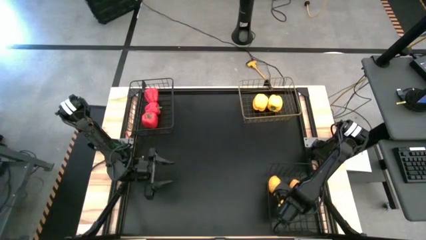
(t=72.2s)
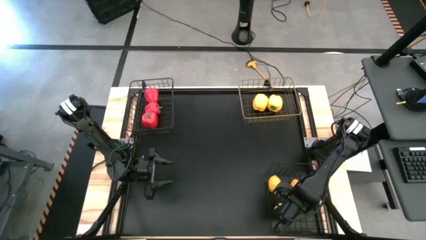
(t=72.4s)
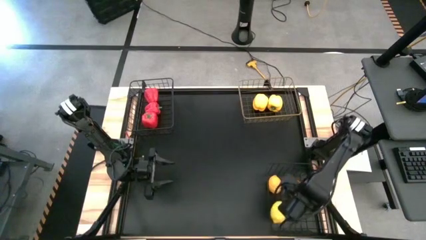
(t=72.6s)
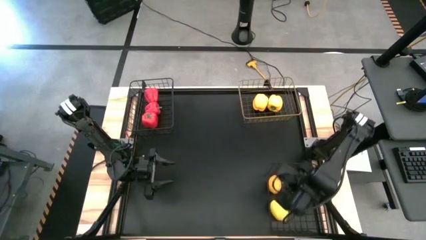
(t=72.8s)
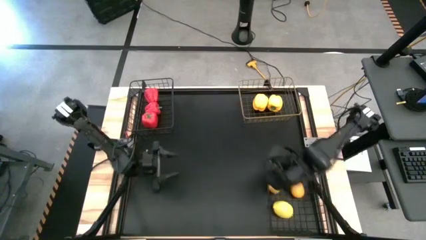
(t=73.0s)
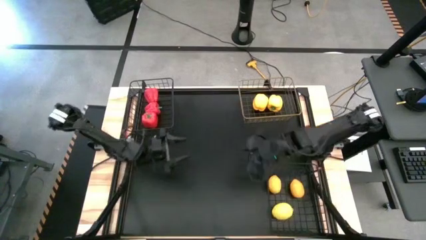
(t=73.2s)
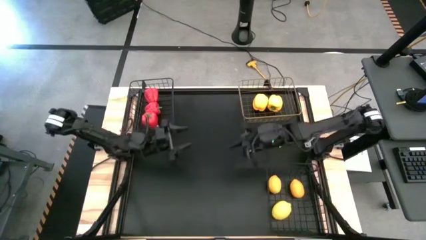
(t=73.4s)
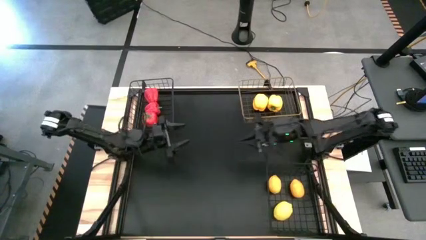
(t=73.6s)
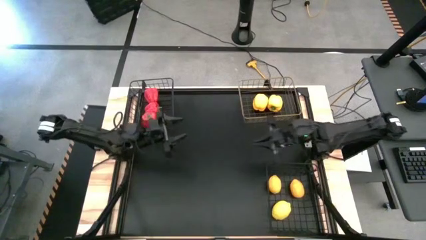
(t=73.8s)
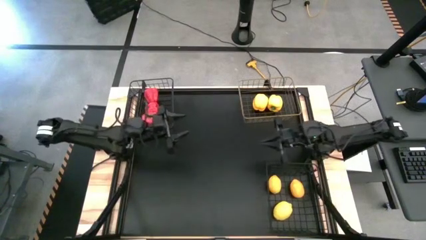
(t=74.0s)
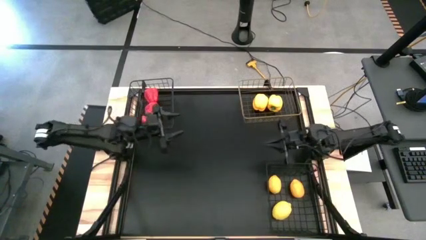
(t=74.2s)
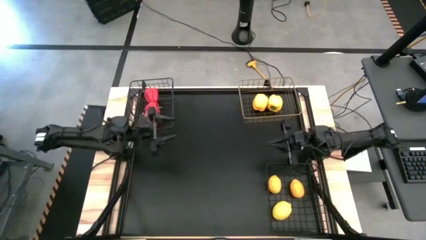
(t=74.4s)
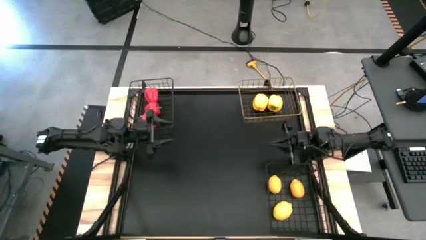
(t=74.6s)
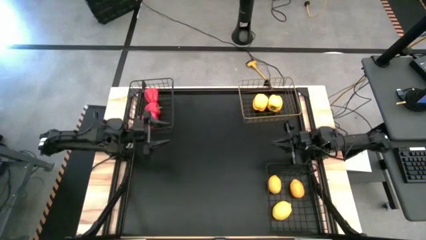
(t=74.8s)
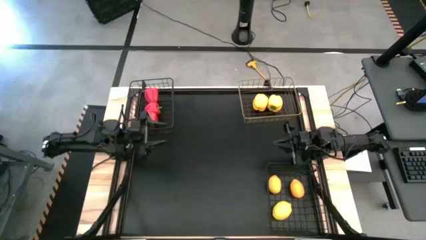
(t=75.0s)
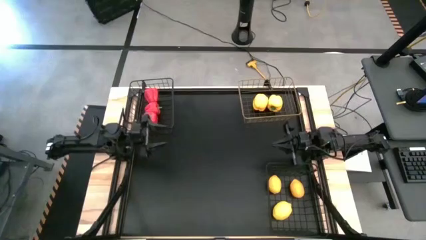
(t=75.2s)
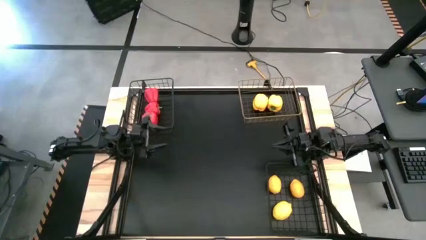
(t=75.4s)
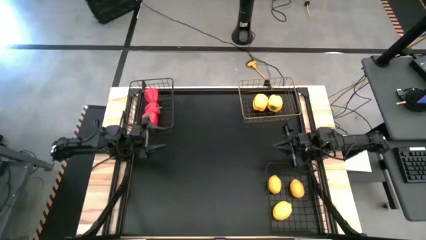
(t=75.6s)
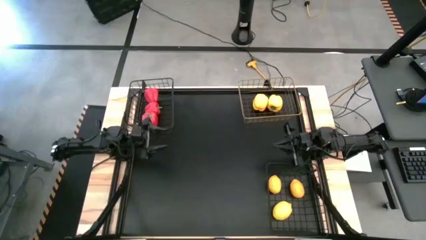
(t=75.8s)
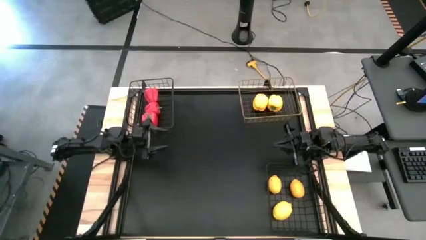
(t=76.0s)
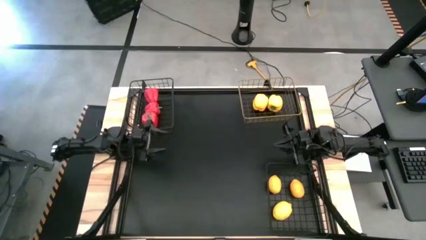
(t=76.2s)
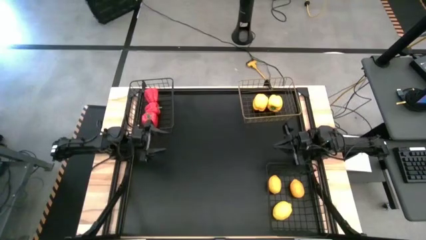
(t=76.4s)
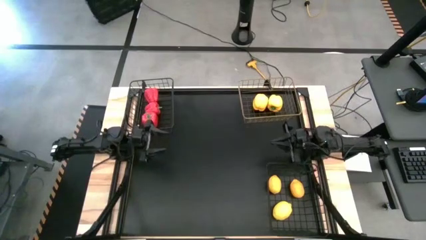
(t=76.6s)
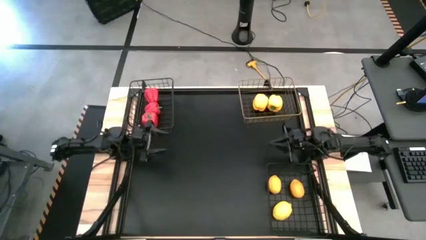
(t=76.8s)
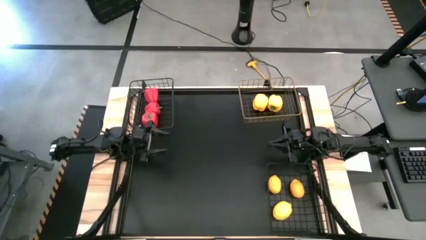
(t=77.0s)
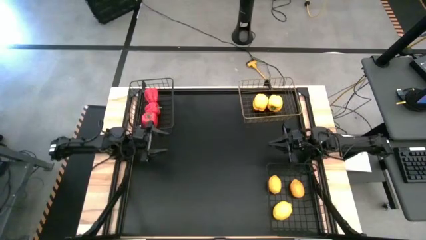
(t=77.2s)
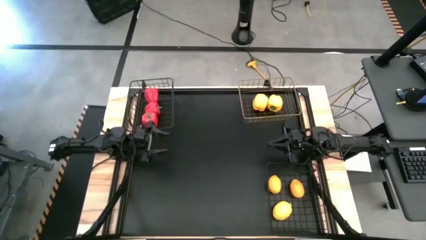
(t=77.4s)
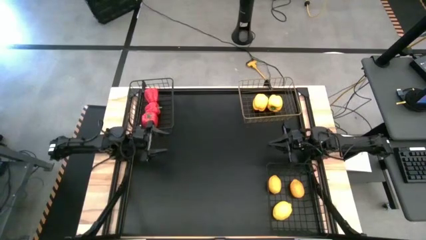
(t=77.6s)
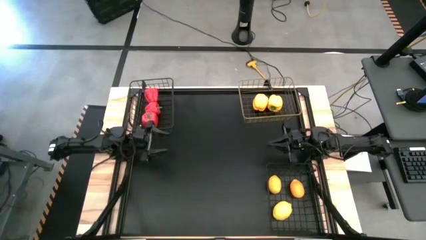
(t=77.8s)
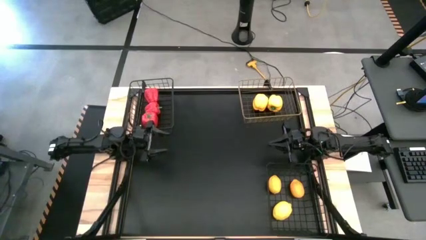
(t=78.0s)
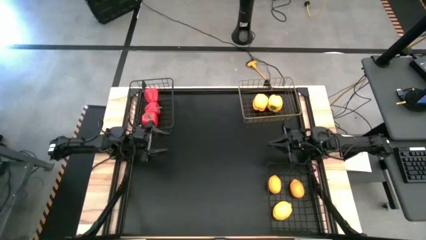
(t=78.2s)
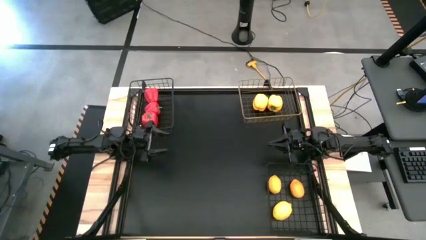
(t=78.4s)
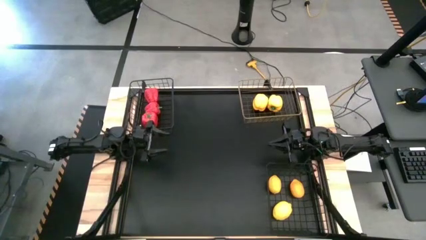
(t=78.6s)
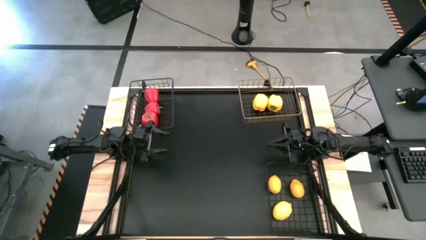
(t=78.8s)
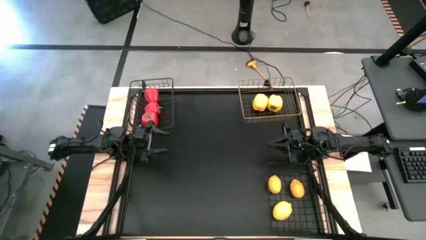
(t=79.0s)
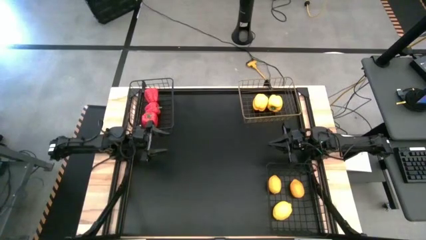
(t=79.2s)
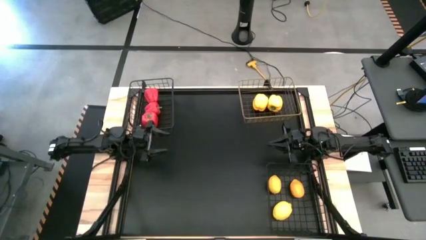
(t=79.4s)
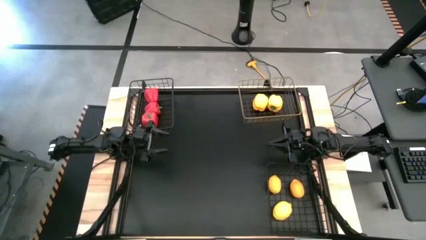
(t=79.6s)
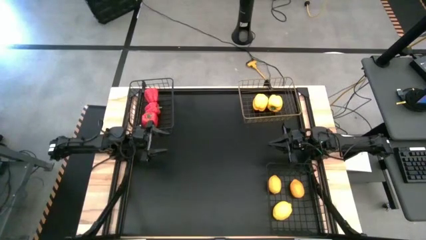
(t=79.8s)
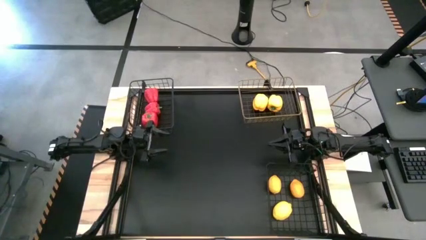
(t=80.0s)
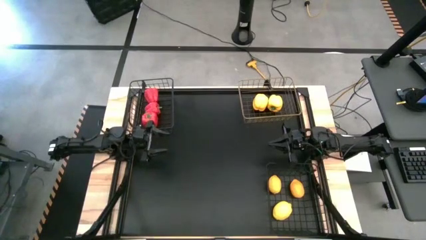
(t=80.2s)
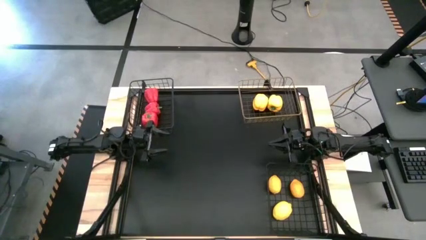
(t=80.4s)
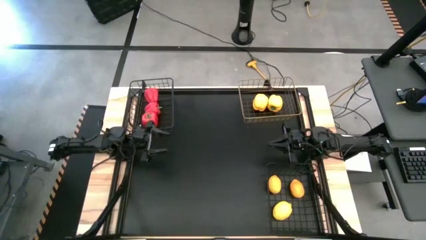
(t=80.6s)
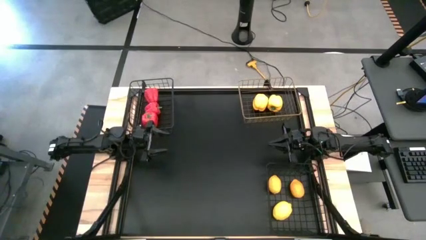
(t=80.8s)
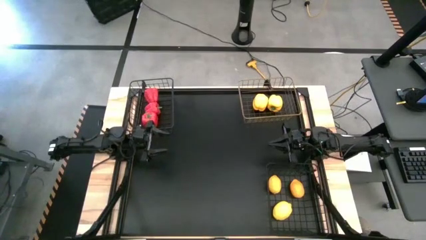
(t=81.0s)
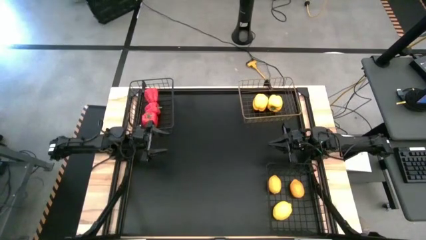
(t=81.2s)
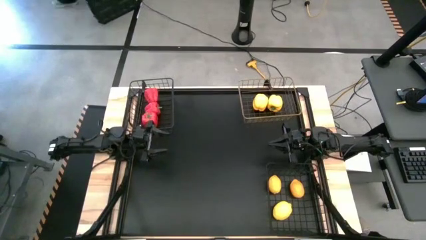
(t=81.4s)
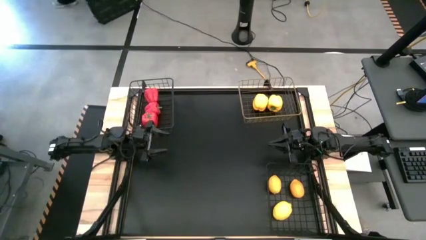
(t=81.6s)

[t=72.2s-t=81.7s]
Task: Sort produce into baskets
Return to Home Position

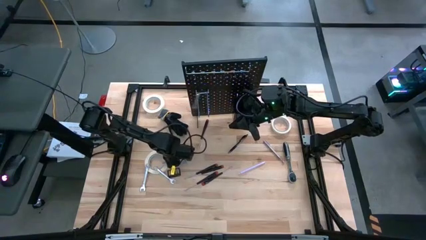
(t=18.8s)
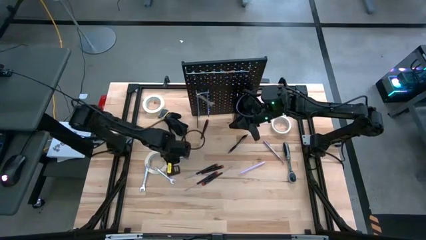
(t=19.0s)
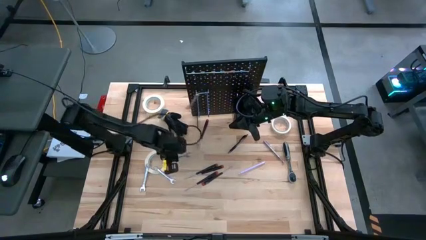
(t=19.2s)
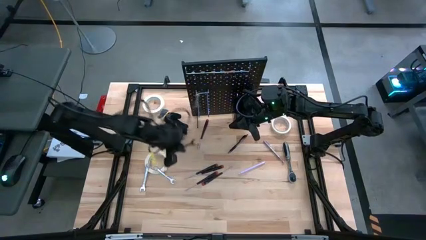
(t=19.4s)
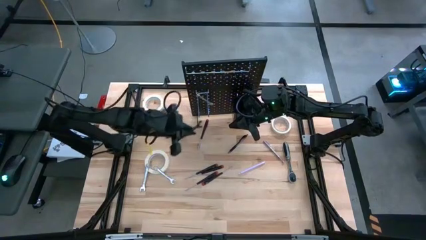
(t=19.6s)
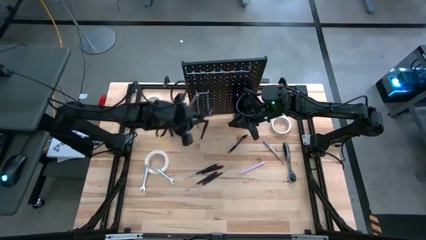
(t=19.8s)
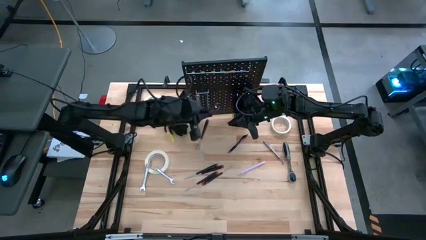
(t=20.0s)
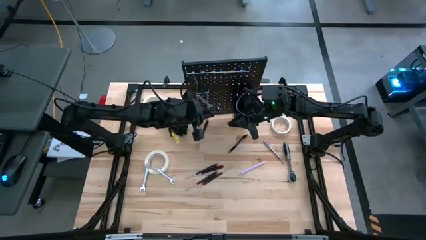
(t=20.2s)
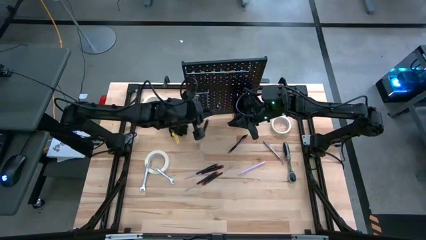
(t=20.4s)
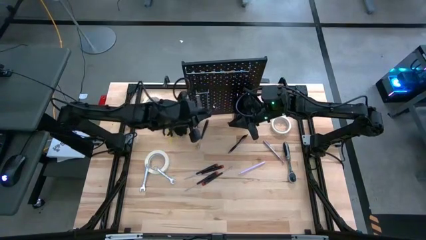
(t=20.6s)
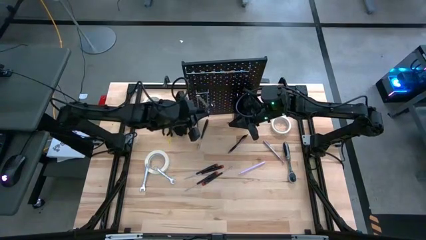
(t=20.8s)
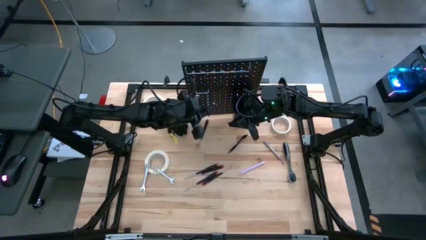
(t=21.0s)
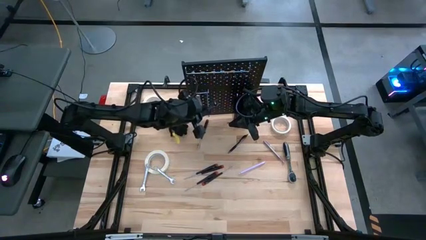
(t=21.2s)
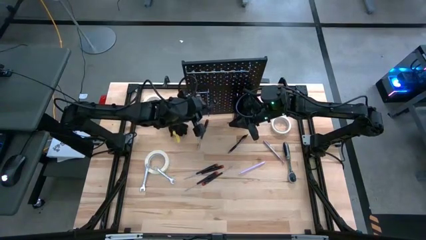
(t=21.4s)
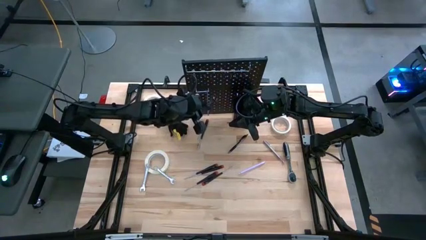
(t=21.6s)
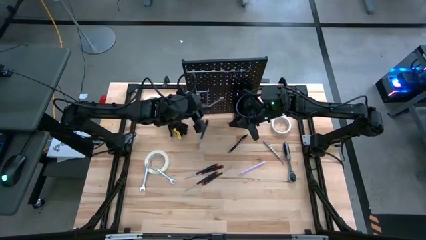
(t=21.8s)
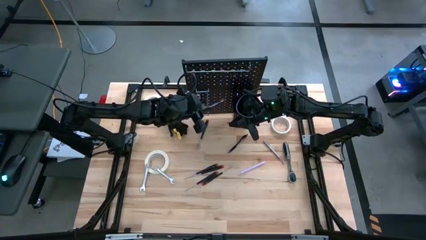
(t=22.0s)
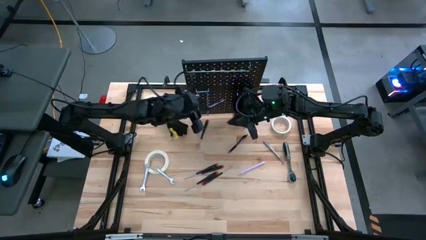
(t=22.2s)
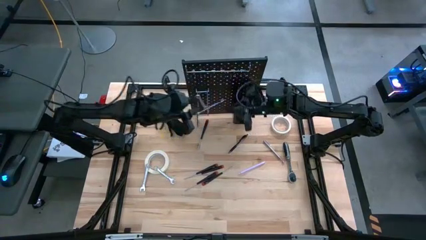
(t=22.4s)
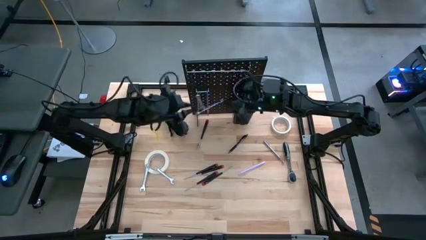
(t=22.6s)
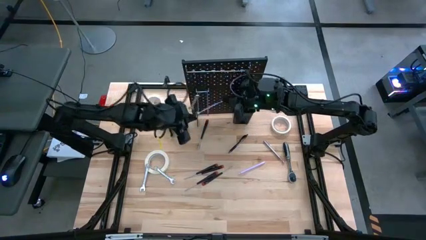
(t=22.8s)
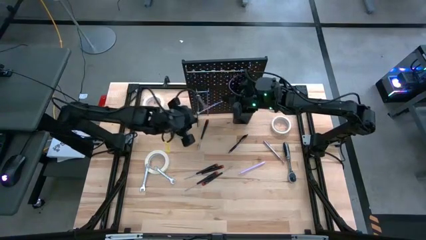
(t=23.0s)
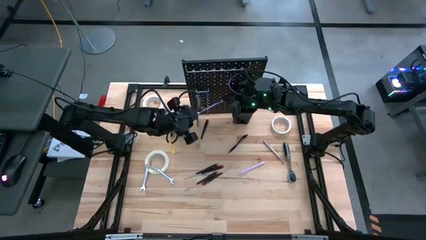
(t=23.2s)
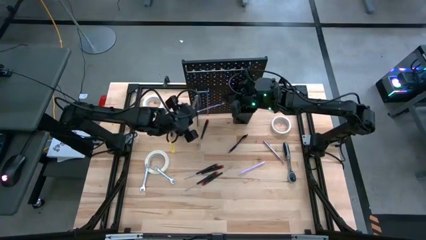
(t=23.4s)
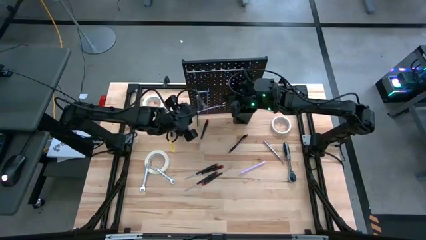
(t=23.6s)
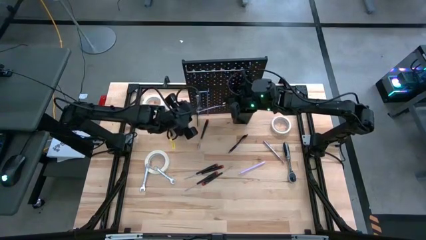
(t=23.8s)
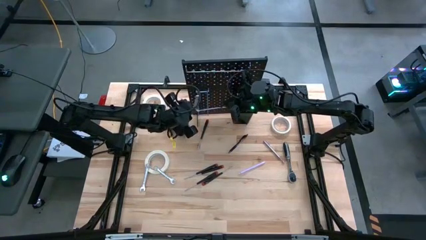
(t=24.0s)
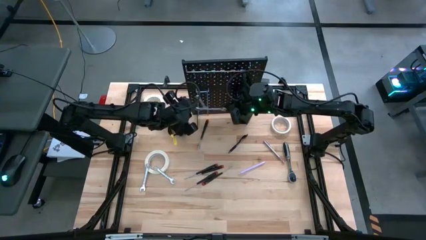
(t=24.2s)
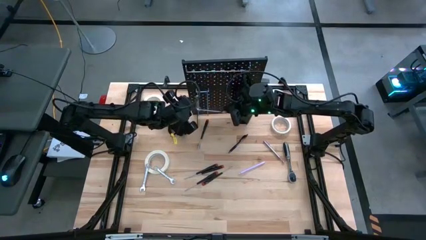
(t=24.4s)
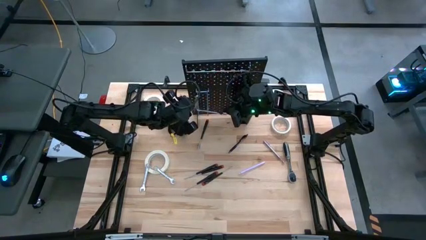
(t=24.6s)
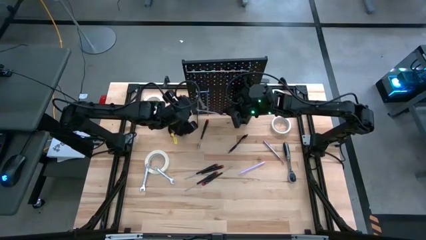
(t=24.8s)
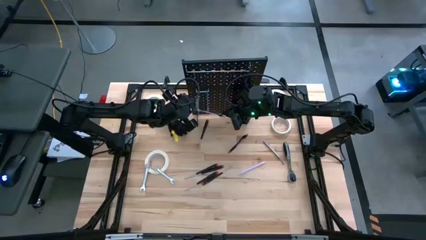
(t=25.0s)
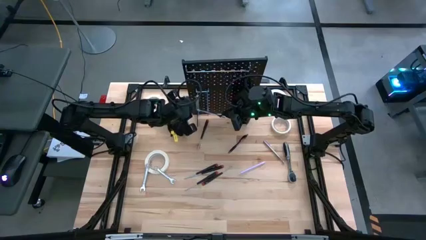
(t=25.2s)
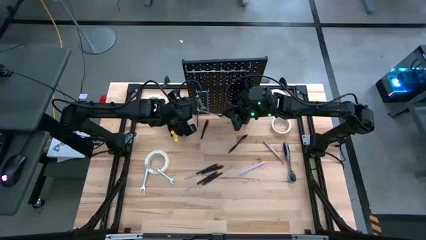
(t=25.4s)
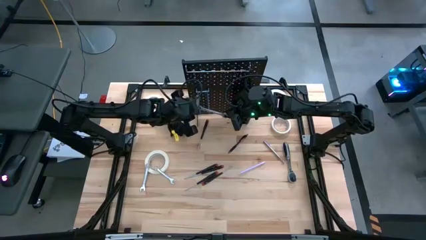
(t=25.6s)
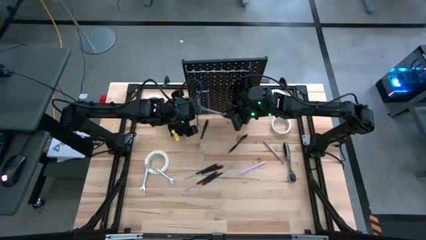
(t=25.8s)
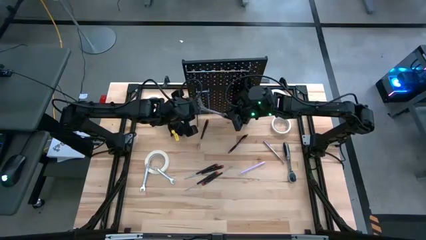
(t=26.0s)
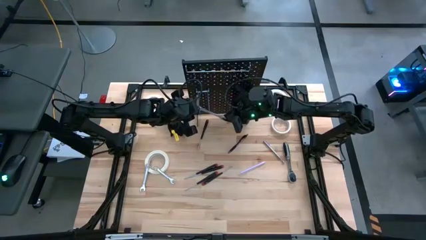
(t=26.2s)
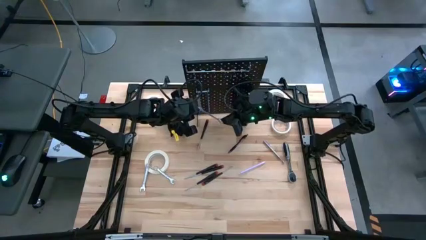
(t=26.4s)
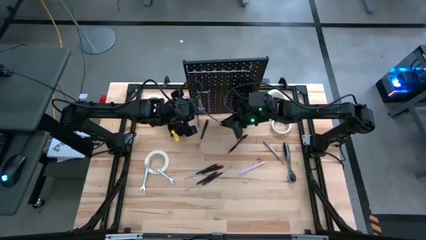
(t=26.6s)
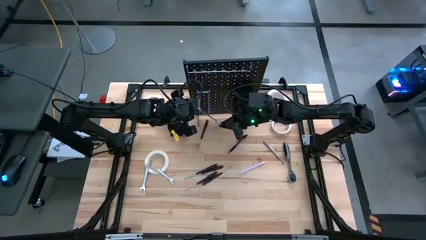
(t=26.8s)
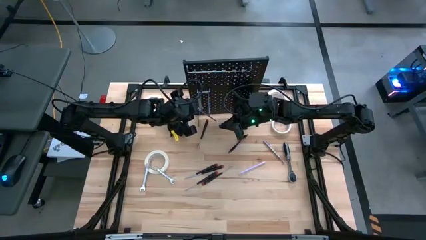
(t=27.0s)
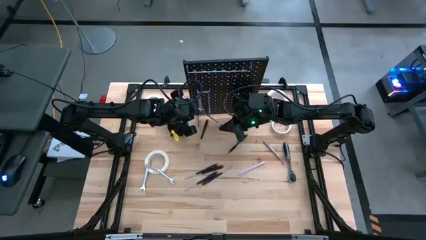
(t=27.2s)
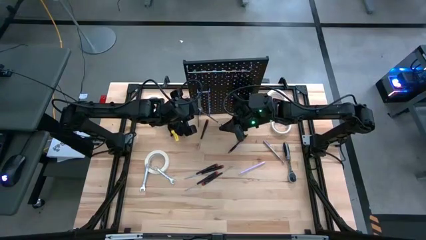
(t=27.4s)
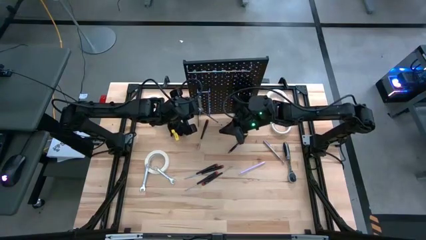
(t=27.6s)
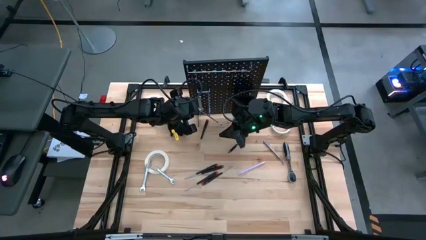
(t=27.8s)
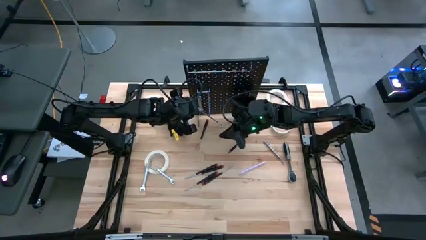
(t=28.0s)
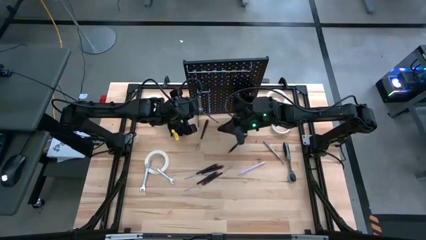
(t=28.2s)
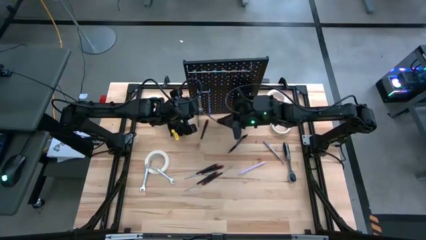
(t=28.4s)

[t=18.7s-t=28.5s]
Task: Hang tools onto peg board
Hang the silver wrench on the peg board
